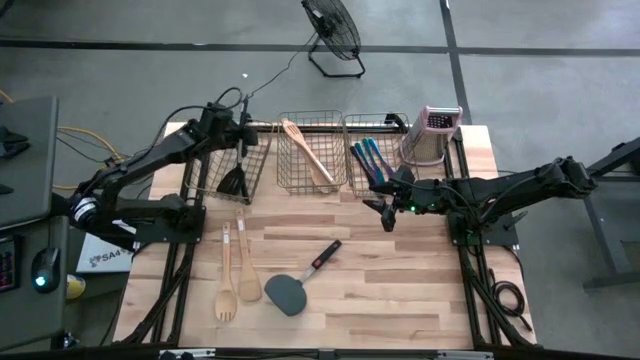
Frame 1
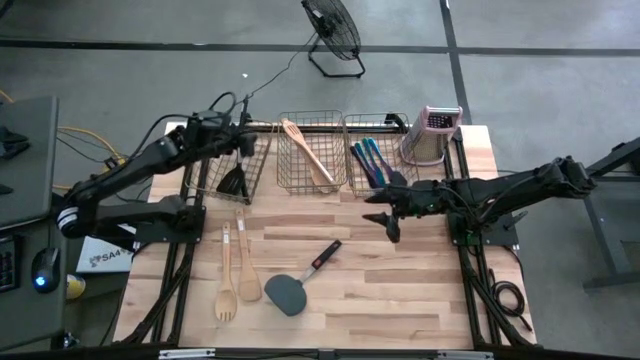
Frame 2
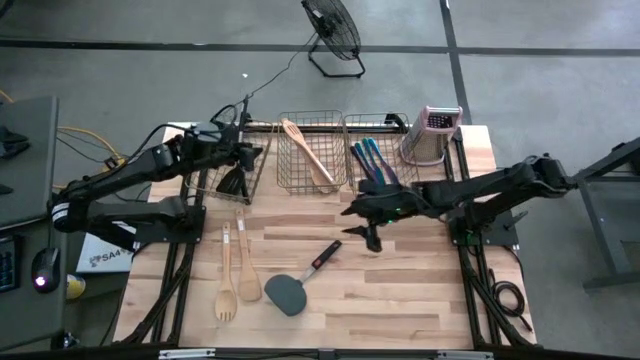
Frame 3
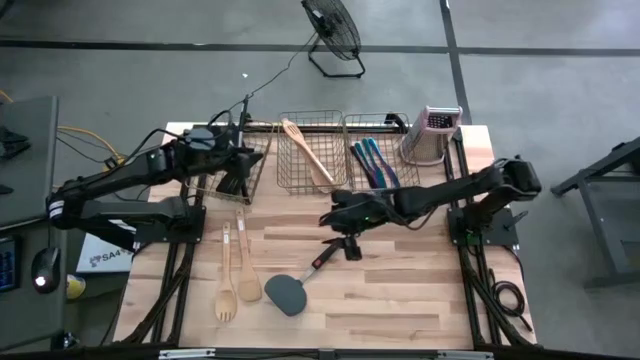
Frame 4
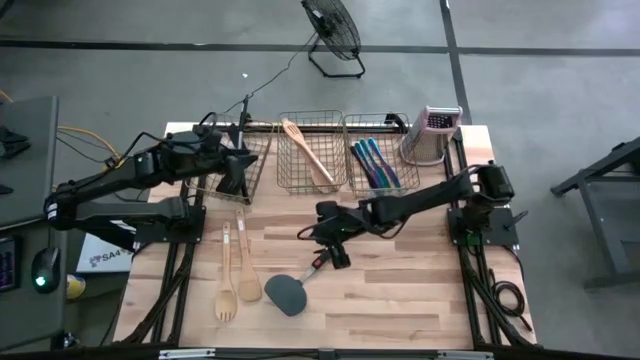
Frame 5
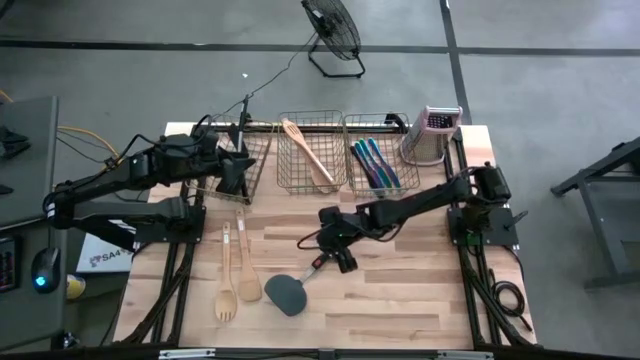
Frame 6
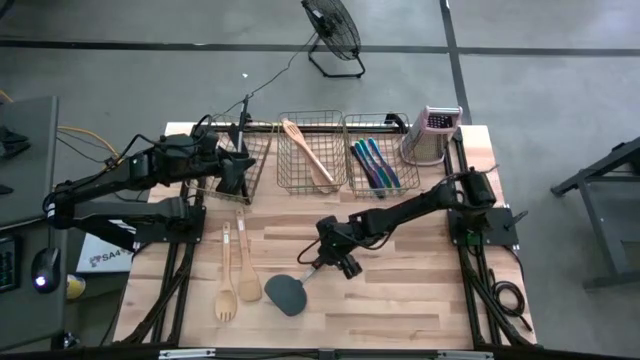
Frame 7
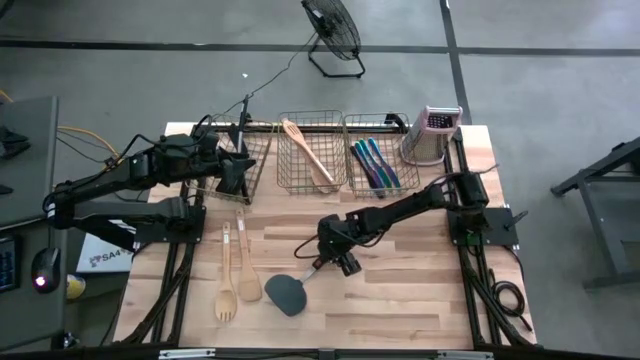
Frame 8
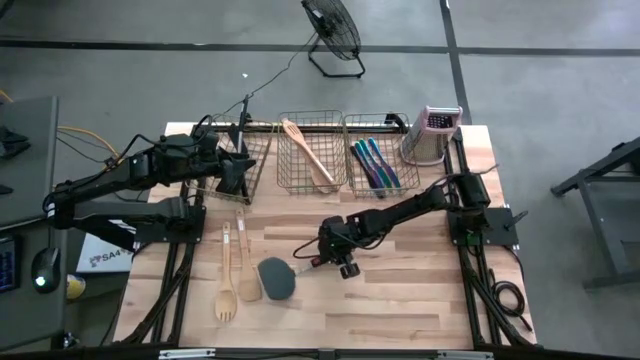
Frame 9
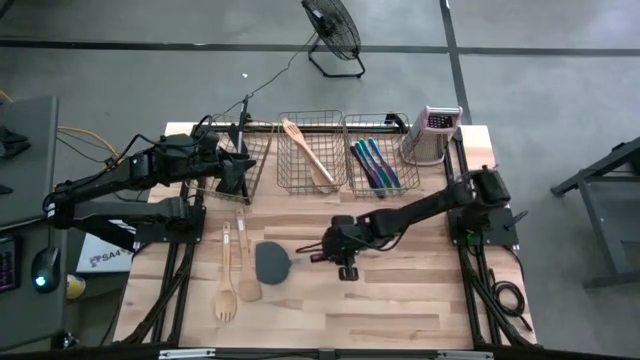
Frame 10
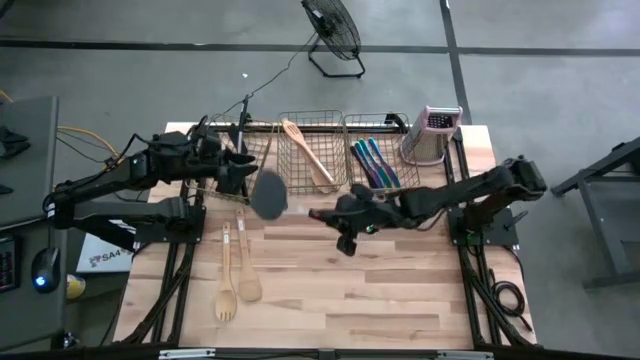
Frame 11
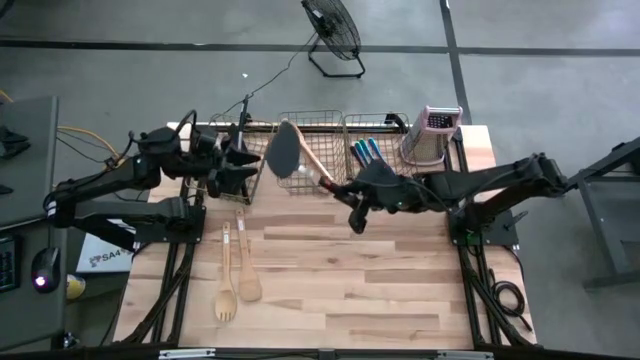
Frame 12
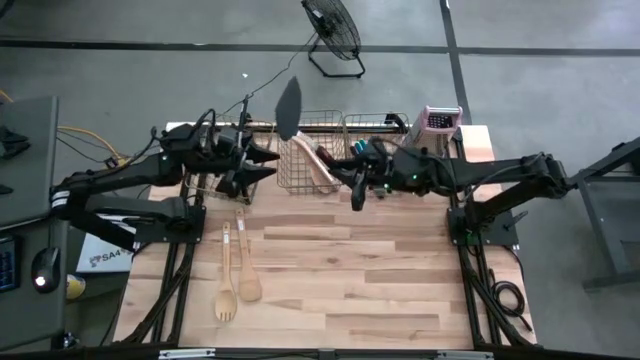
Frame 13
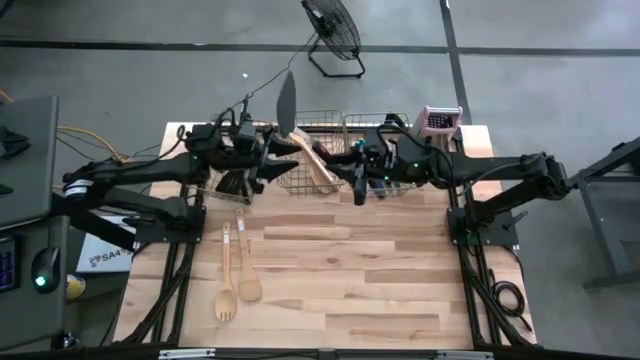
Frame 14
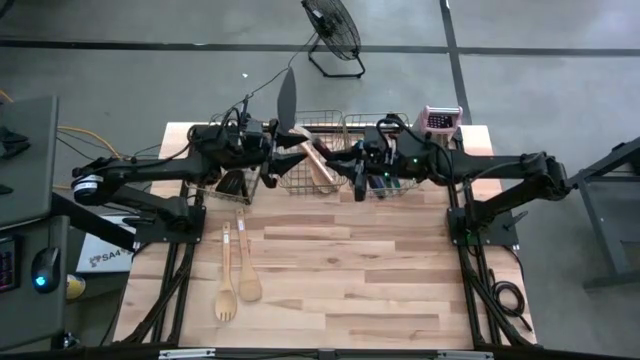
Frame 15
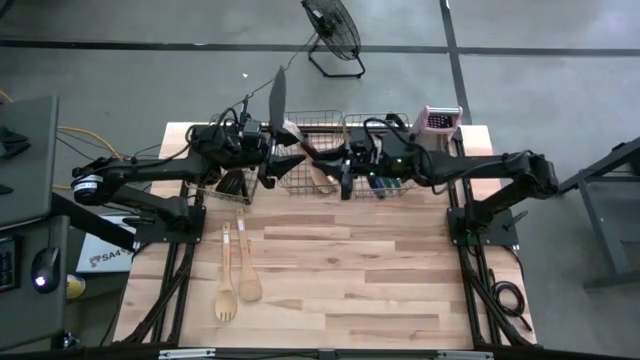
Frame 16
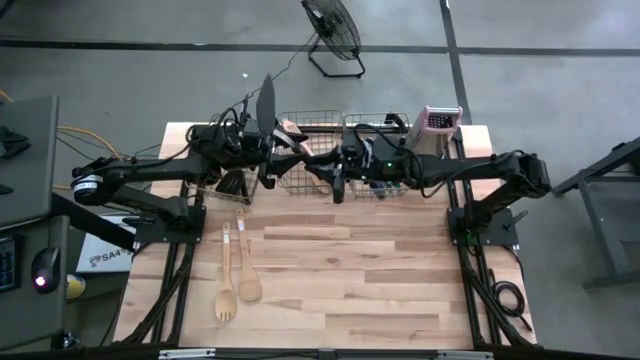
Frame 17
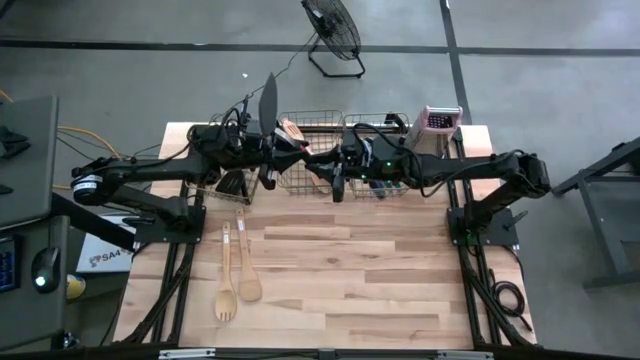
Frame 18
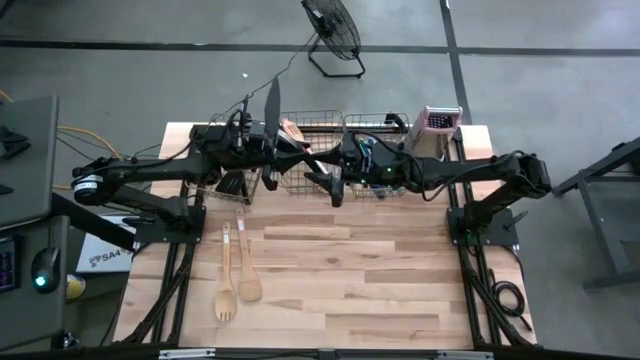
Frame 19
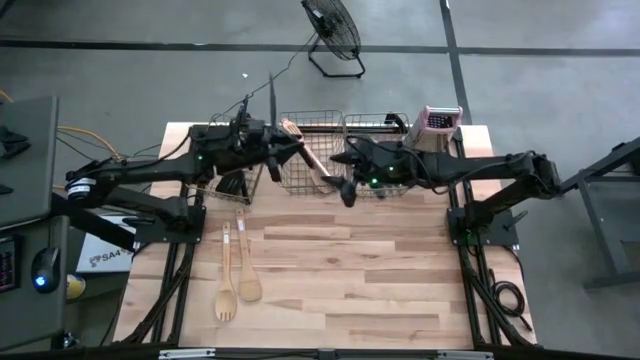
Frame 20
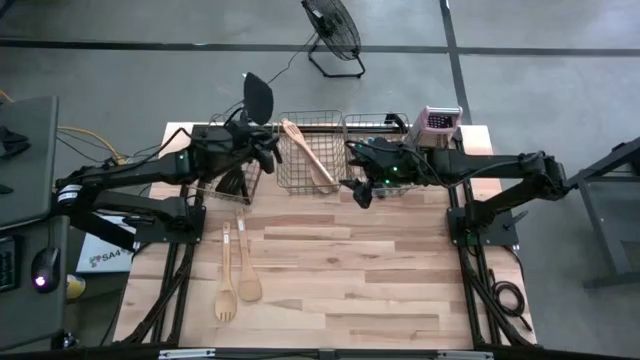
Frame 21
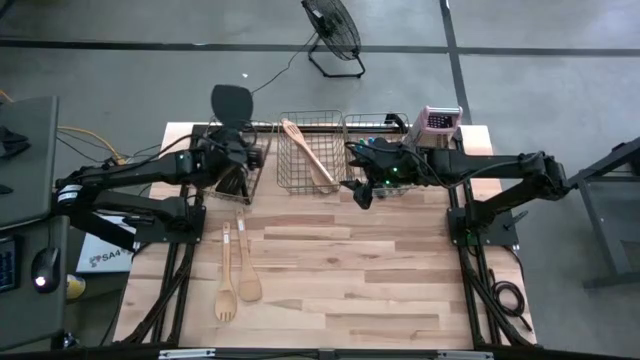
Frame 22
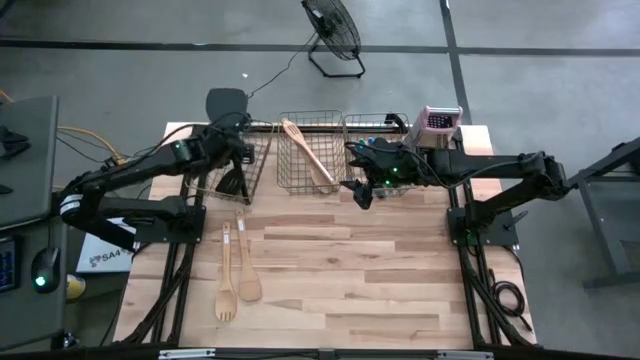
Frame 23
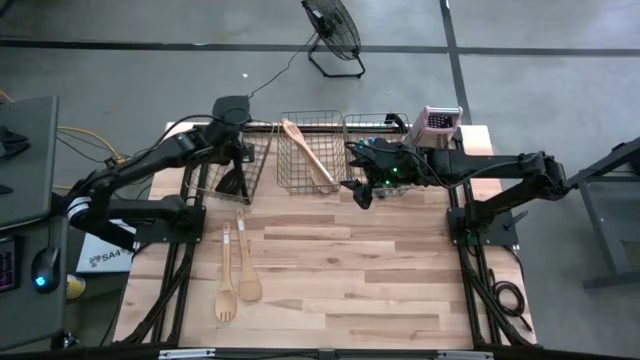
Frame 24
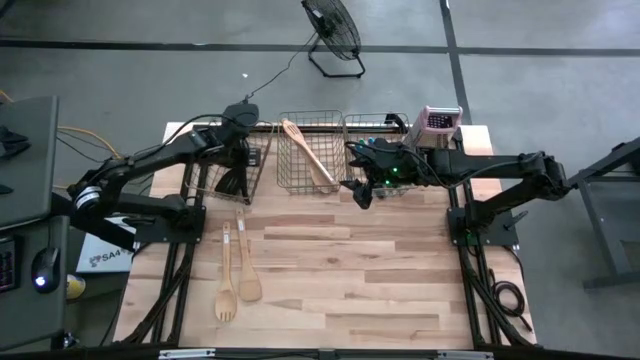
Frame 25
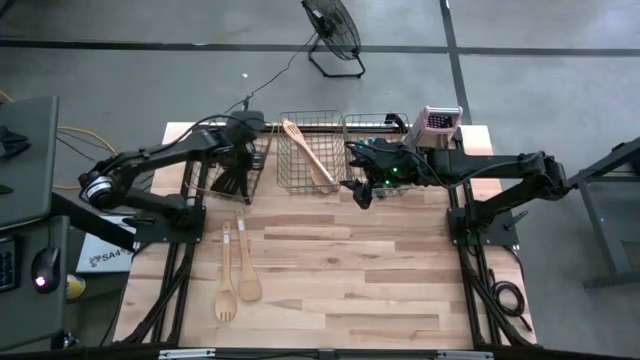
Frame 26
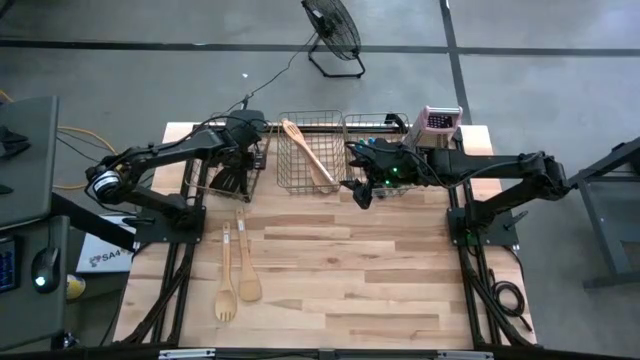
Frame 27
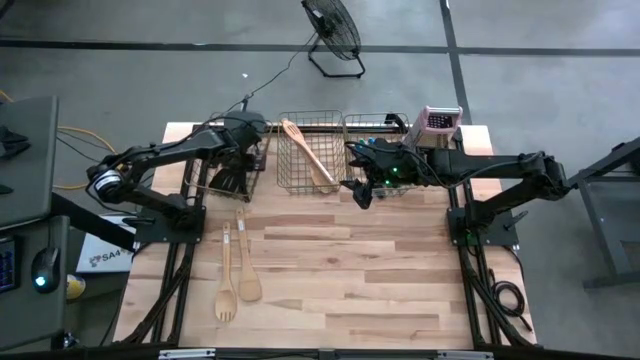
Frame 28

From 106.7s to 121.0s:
Task: Pick & Place Kitchen Items
Put the black spatula into the left wire basket

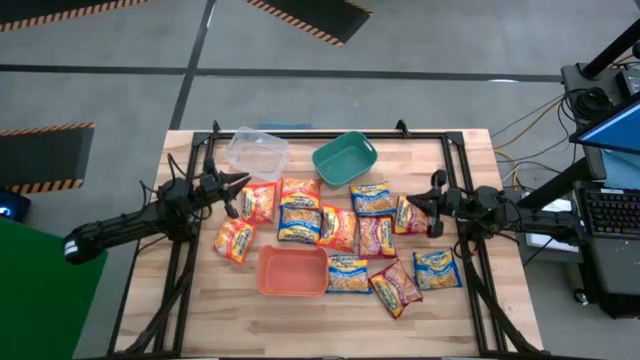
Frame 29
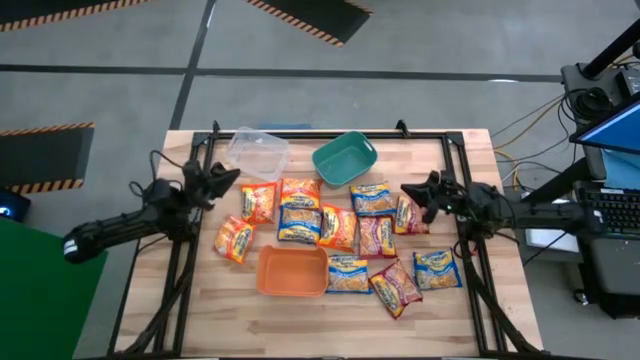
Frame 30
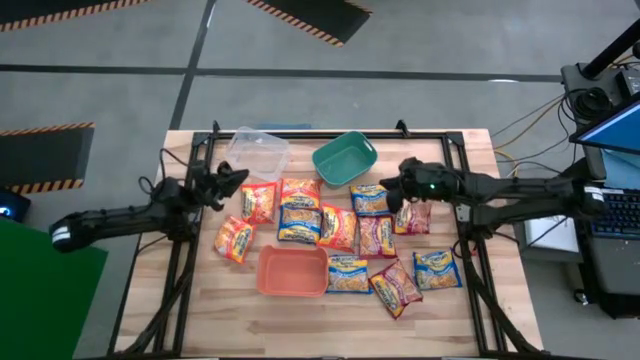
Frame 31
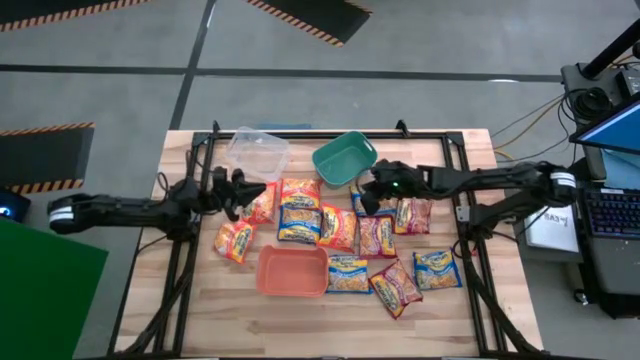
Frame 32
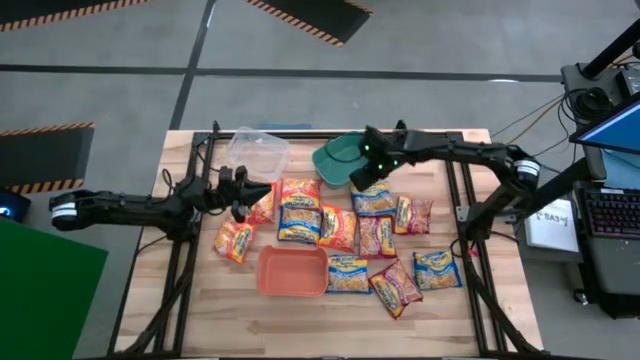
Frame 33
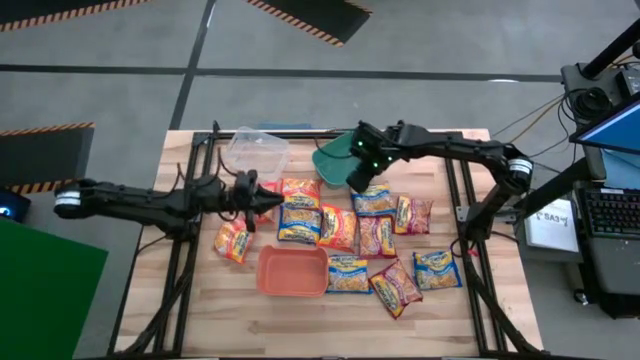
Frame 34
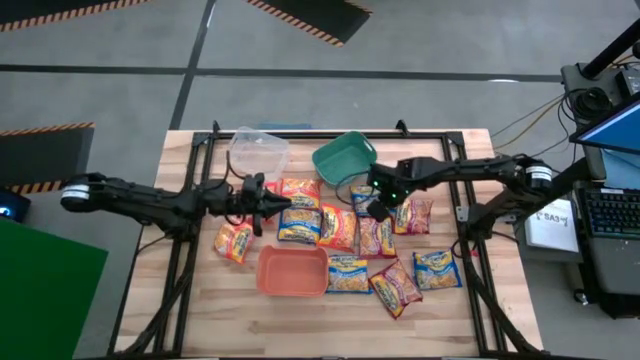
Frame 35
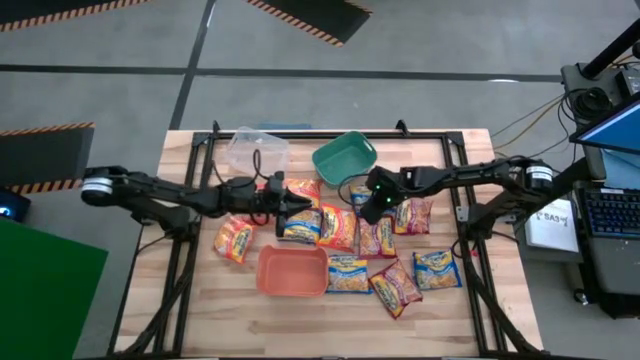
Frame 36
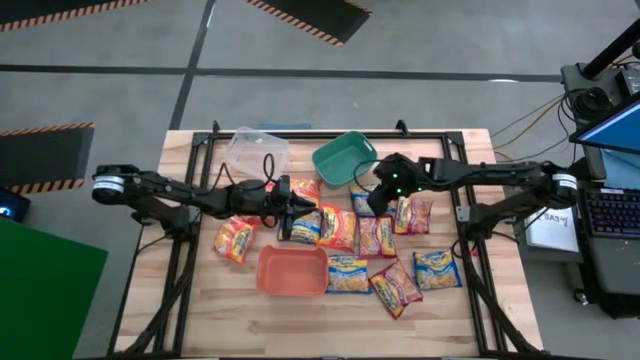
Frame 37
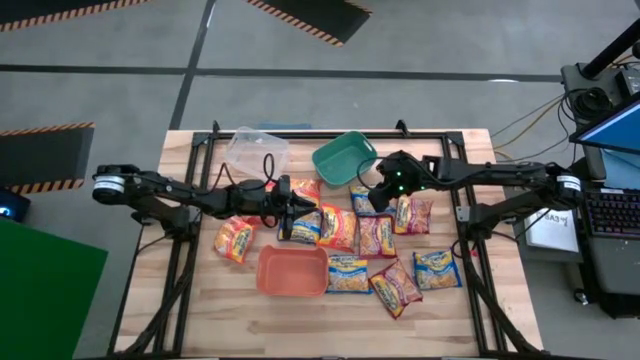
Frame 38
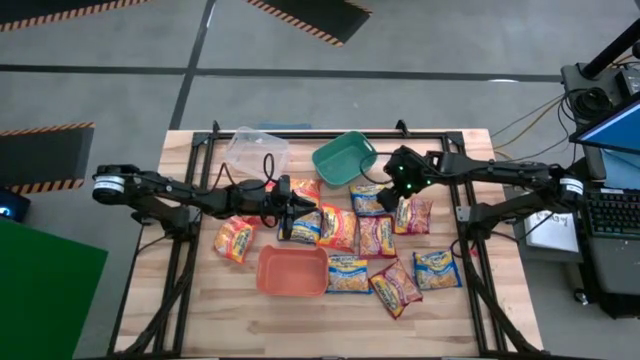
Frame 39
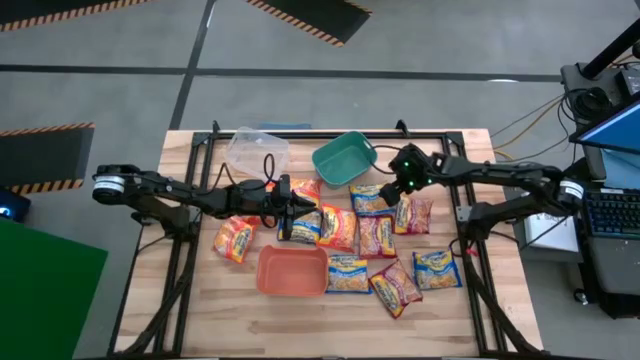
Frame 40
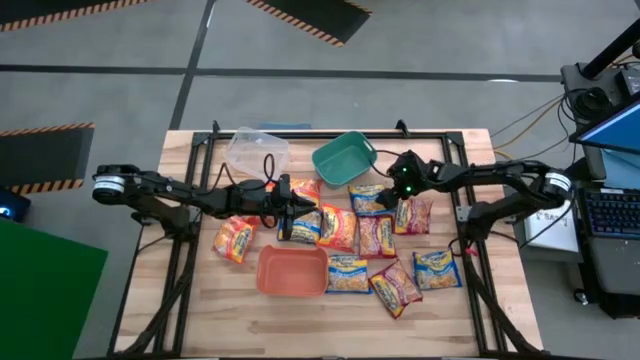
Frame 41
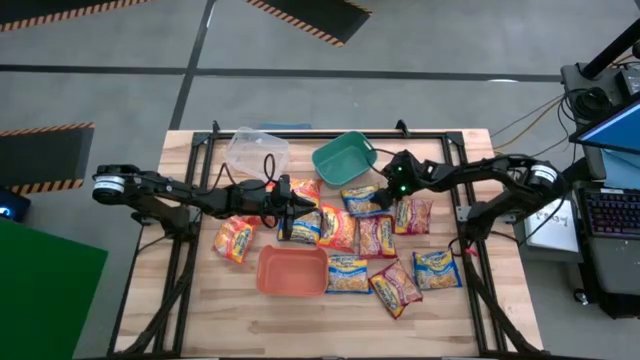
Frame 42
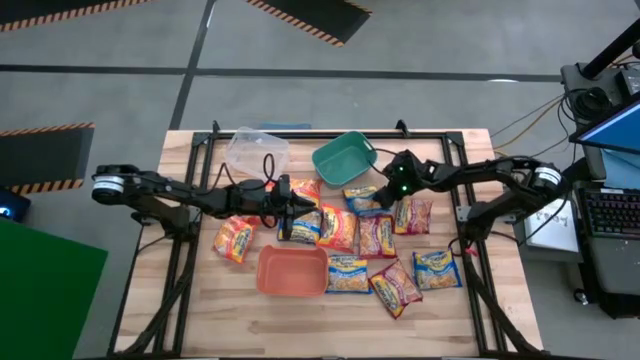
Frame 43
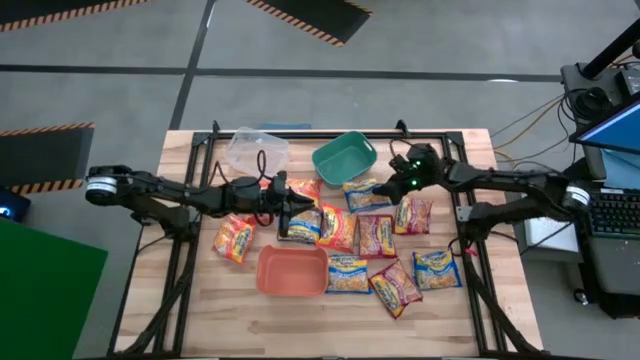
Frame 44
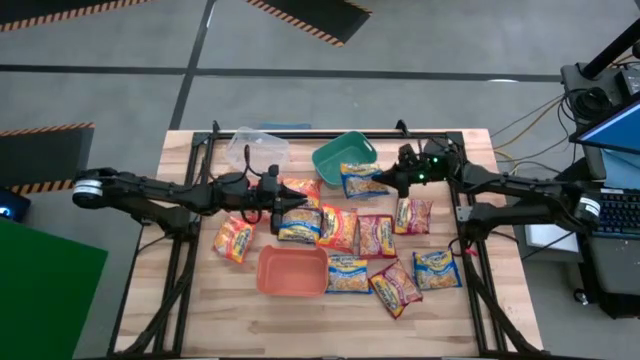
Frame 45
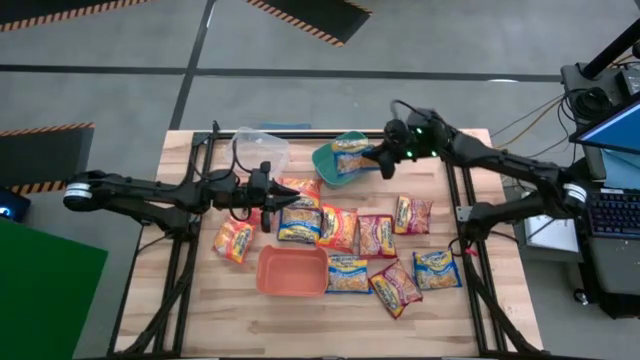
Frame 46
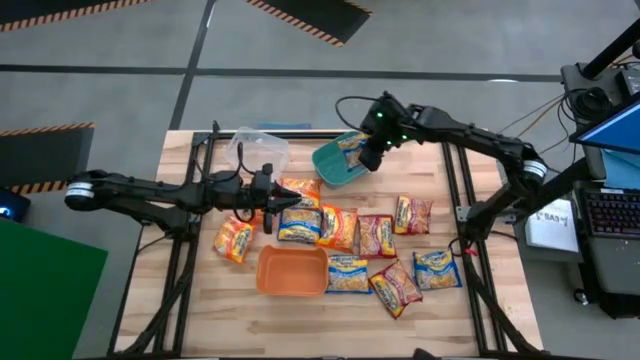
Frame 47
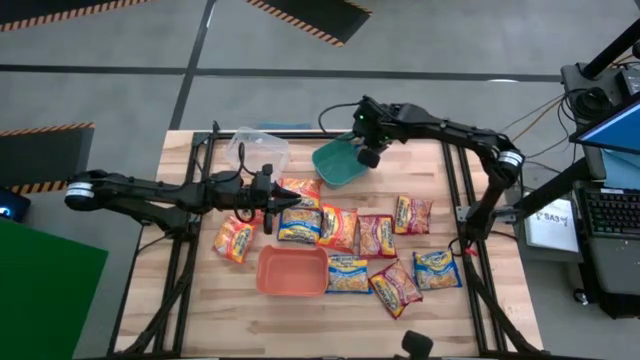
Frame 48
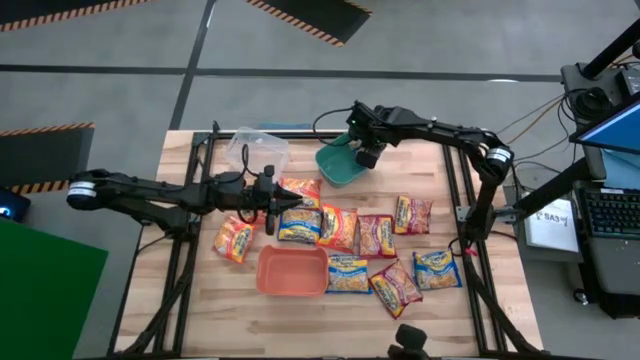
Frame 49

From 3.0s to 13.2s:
Task: Sort Maruchan noodles
Put the blue noodle pack into the green bin
